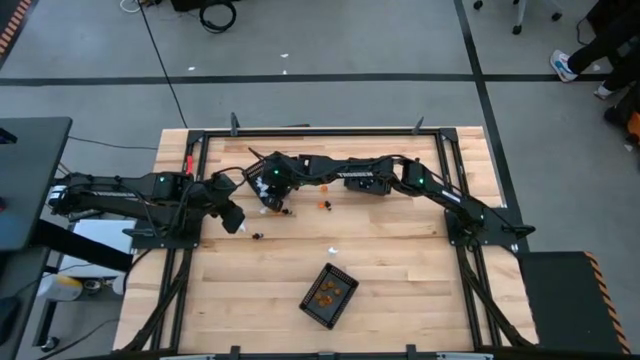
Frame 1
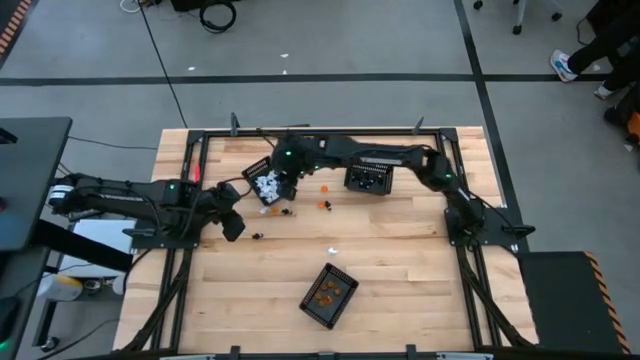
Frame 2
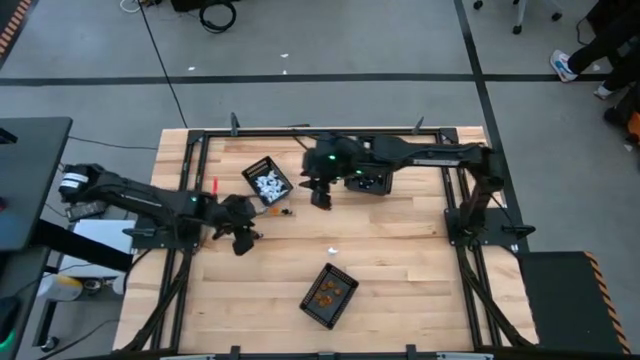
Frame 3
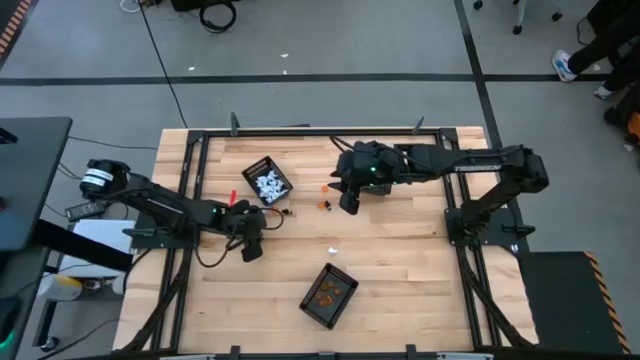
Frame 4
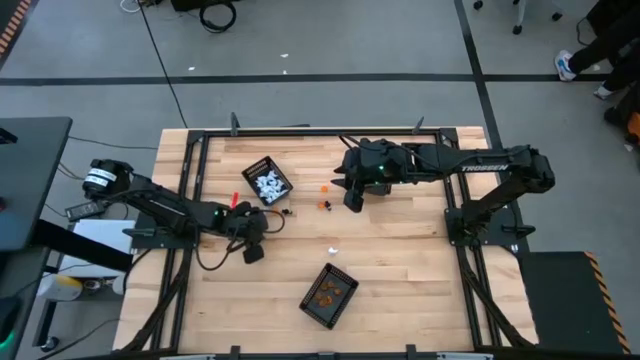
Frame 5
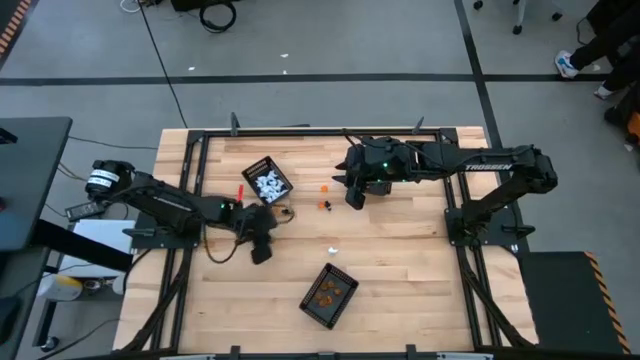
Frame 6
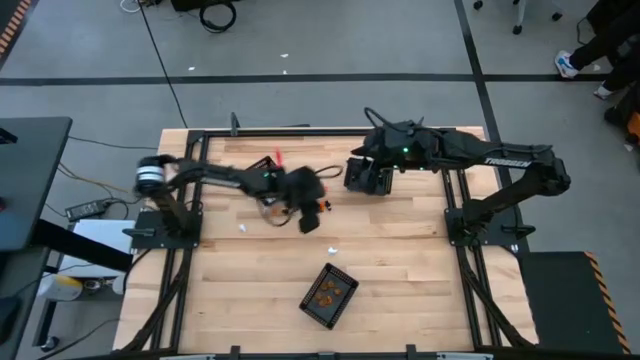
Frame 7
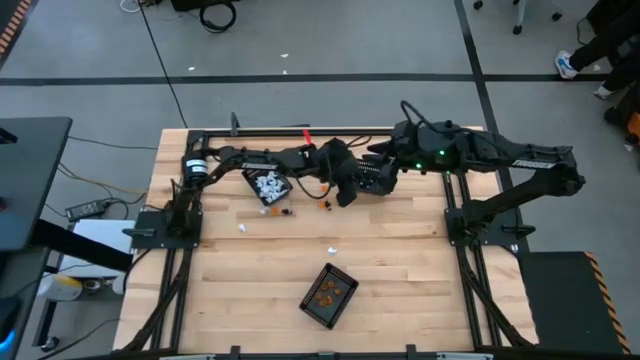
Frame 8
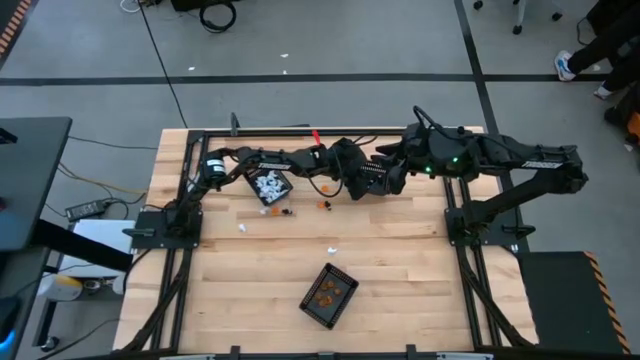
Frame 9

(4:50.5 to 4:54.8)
Task: Sort Halloween decoration
Put the black skeleton toy into the top right black basket

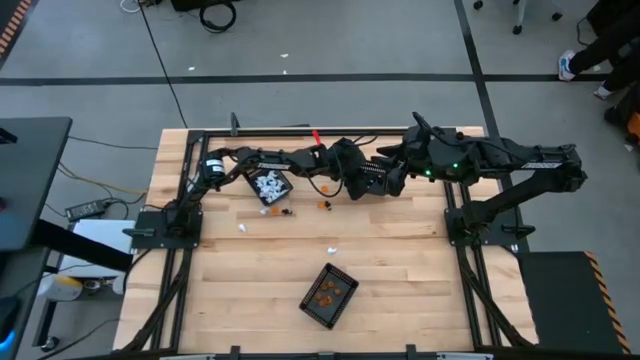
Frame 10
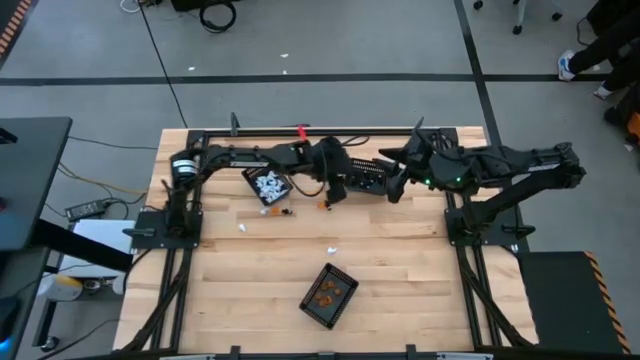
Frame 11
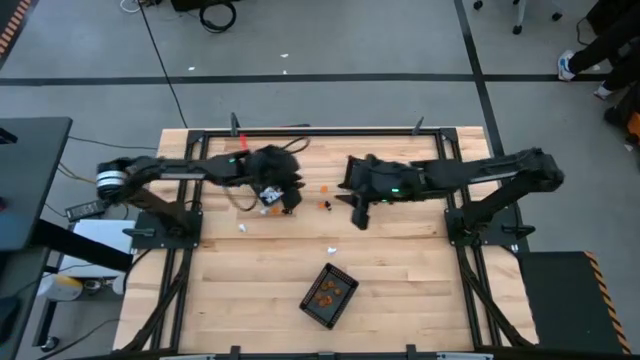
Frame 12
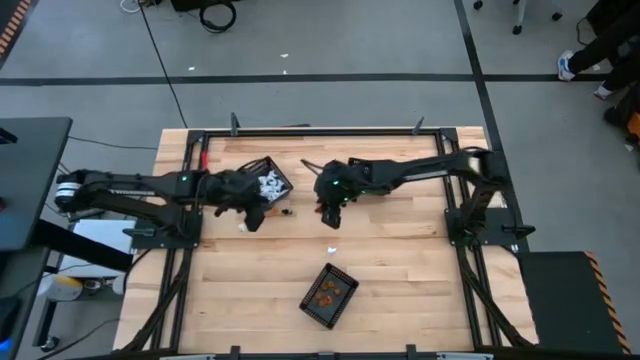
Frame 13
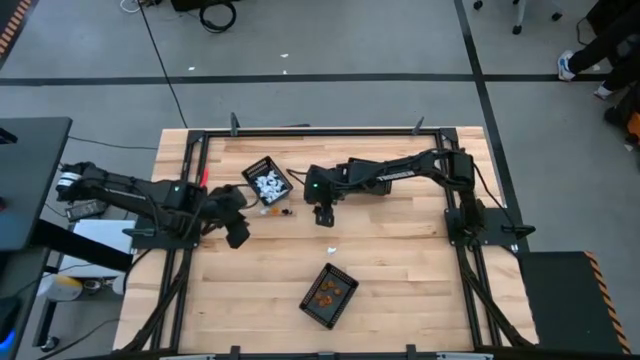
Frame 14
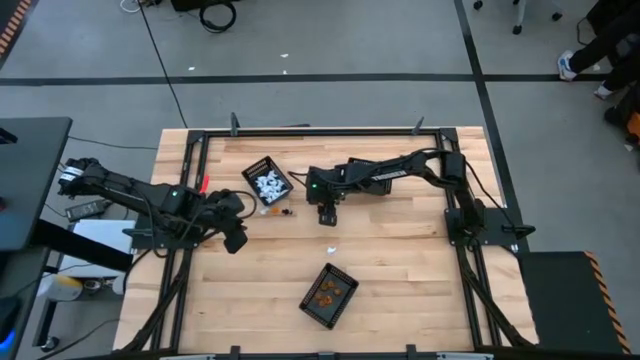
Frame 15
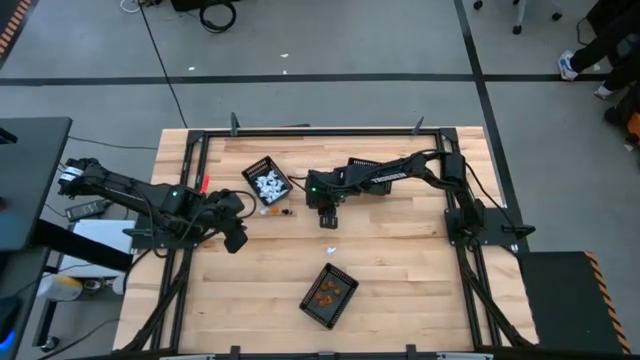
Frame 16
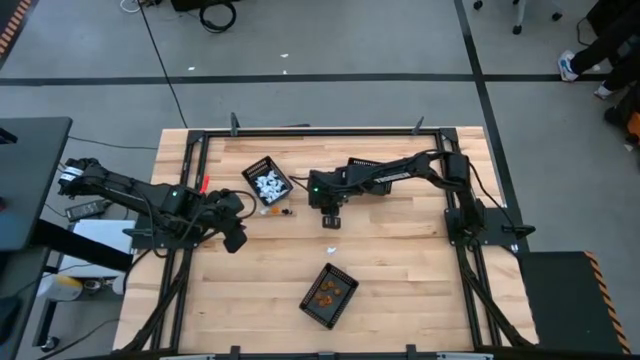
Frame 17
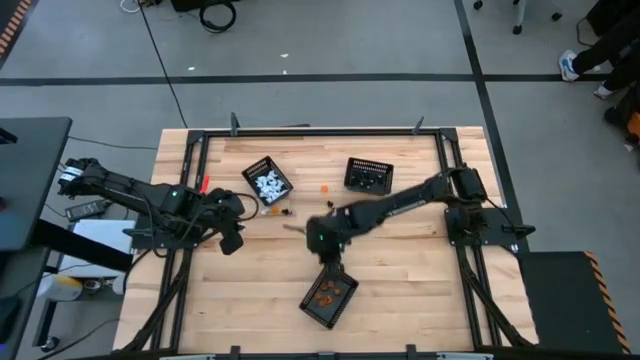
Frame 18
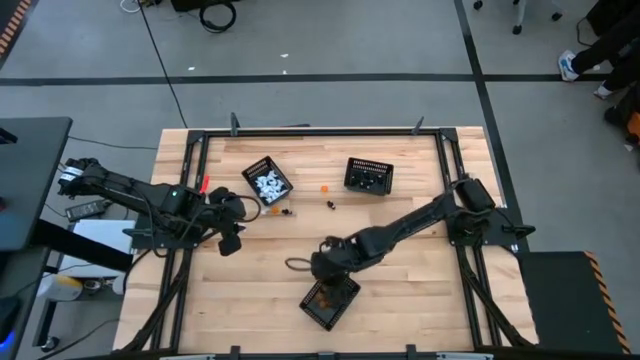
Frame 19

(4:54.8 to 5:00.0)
Put the orange pumpkin toy into the bottom black basket

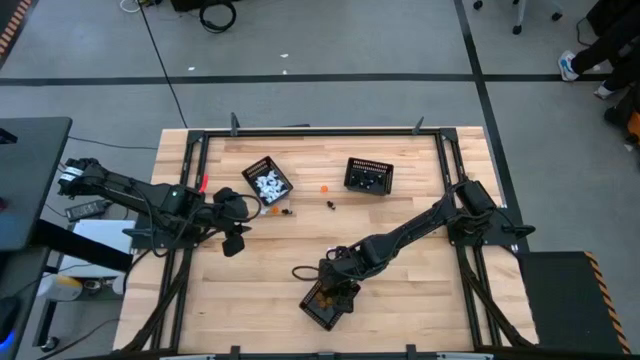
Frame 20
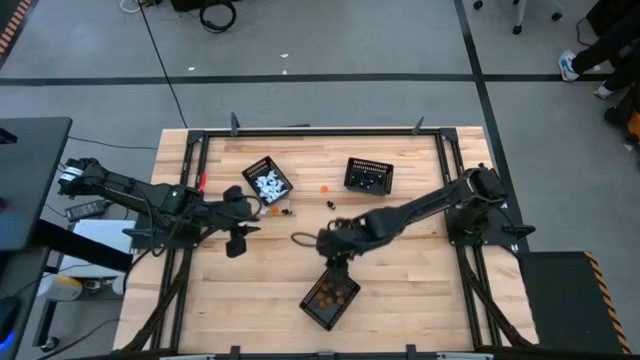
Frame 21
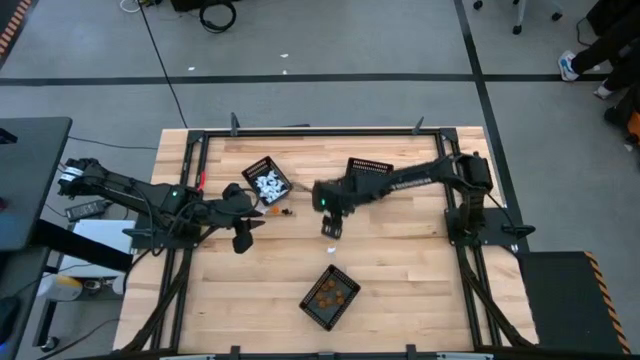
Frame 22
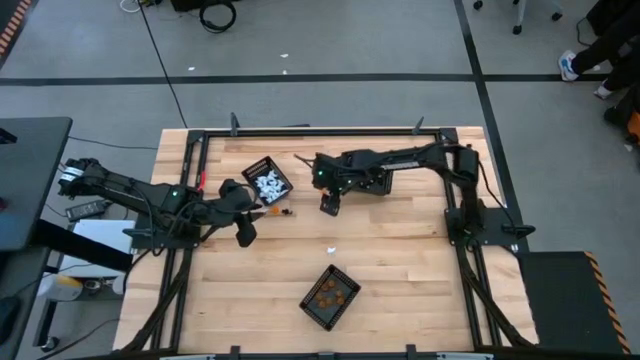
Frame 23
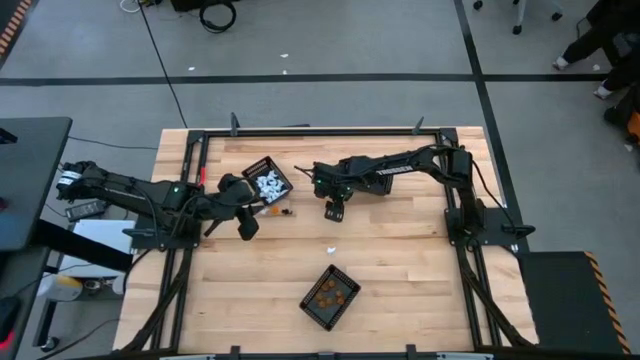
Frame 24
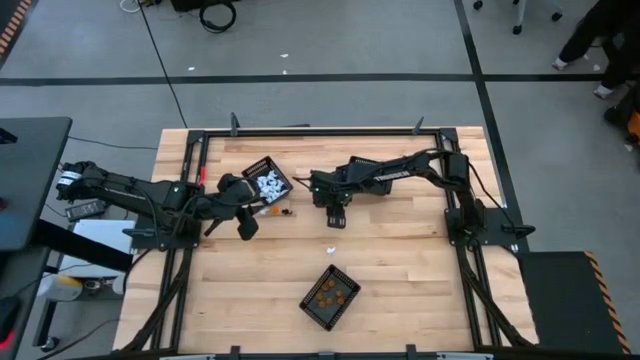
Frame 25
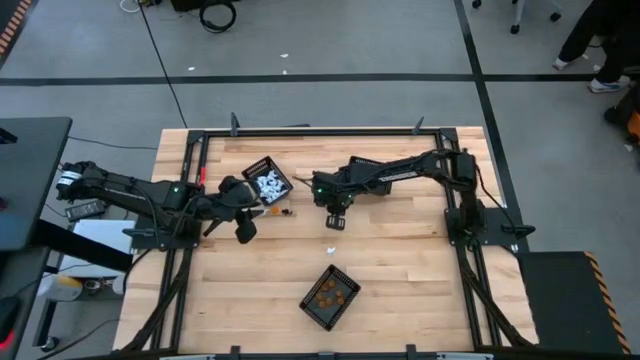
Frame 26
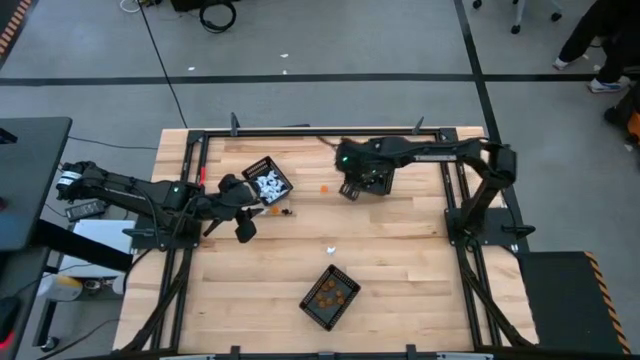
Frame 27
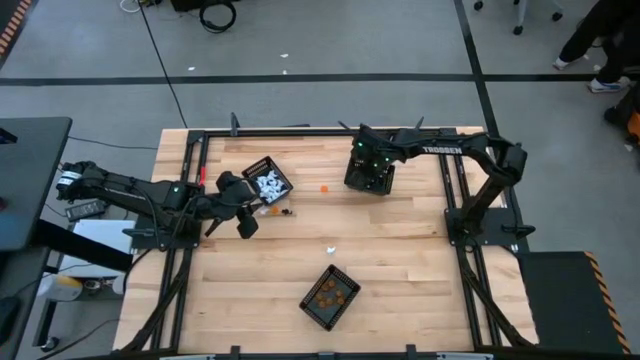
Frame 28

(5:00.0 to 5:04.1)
Put the black skeleton toy into the top right black basket

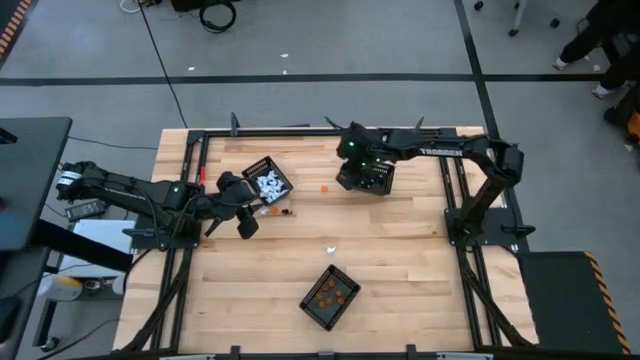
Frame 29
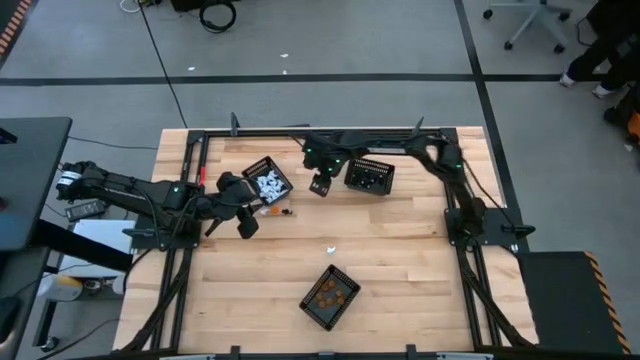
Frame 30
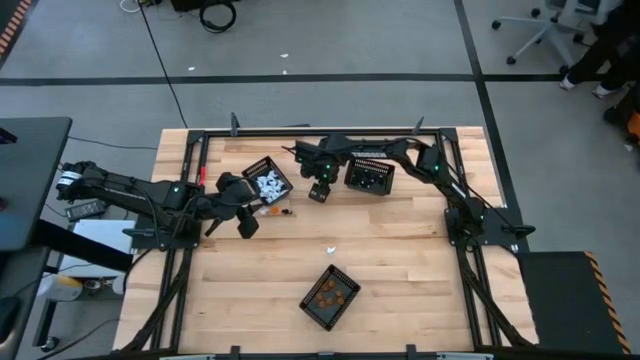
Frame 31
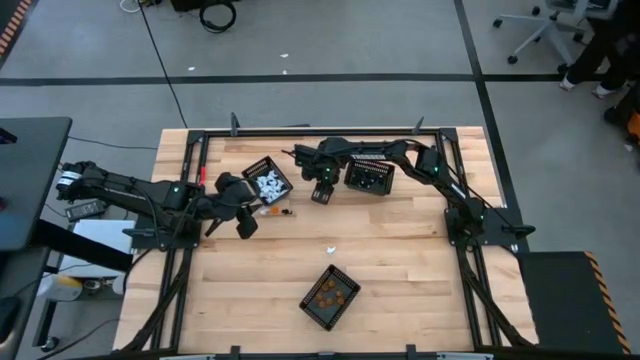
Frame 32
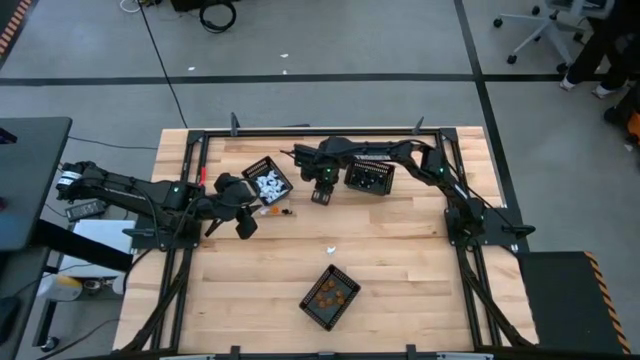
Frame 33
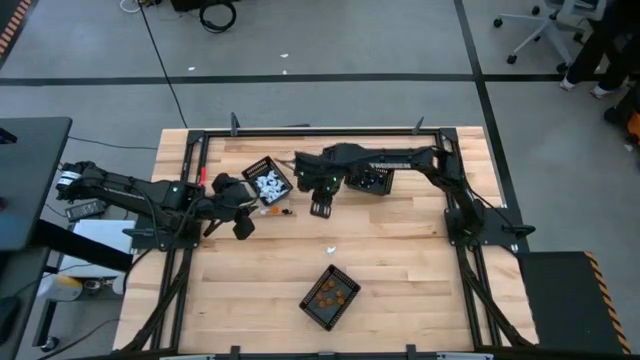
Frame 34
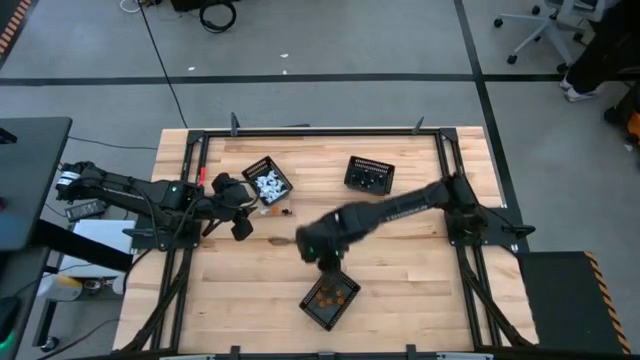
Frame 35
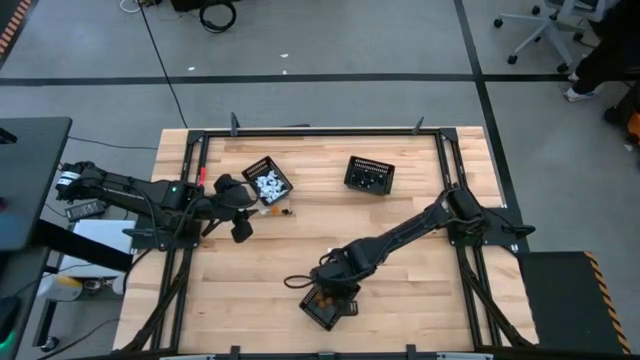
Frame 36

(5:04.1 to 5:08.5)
Put the orange pumpkin toy into the bottom black basket

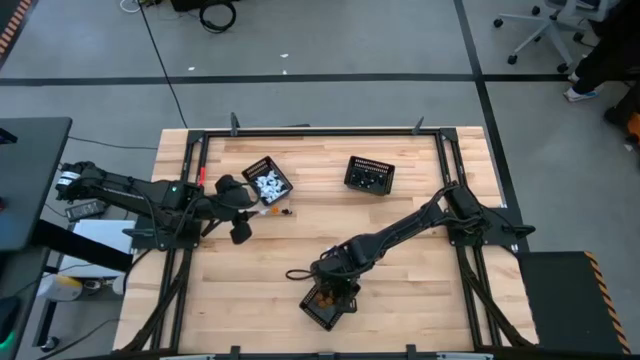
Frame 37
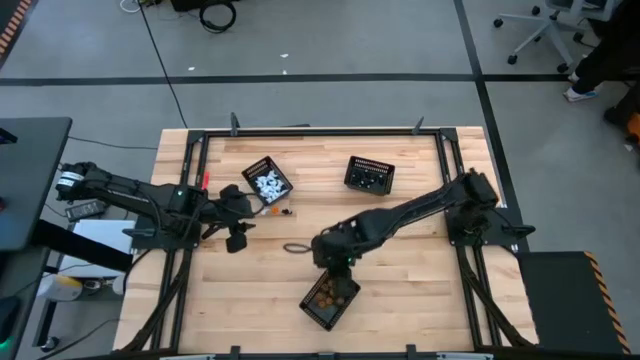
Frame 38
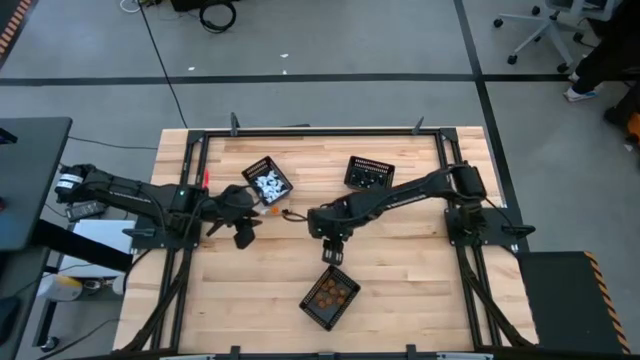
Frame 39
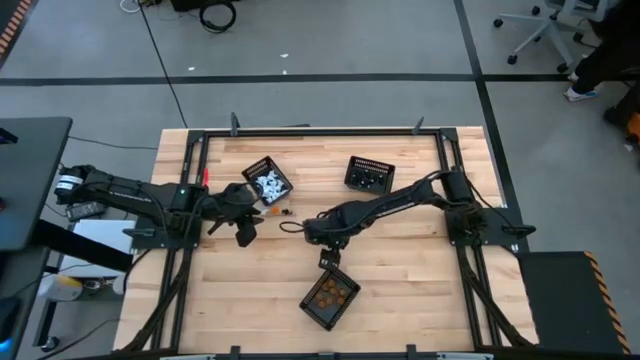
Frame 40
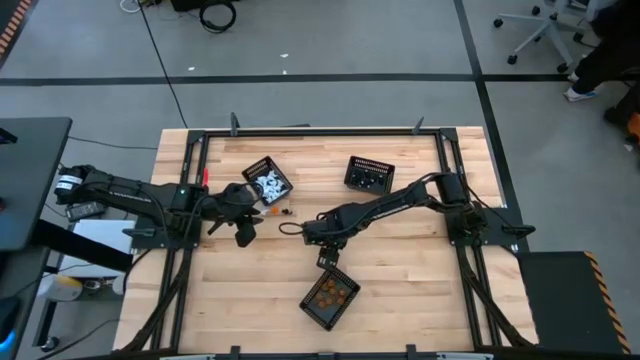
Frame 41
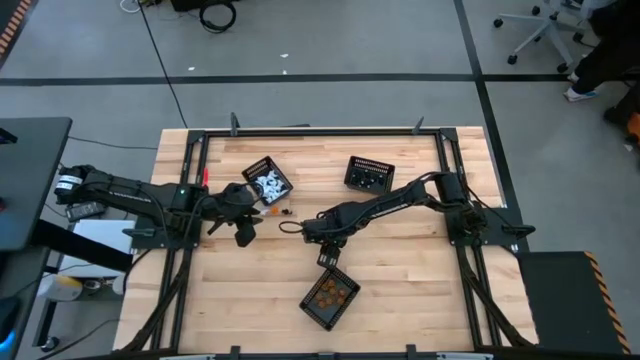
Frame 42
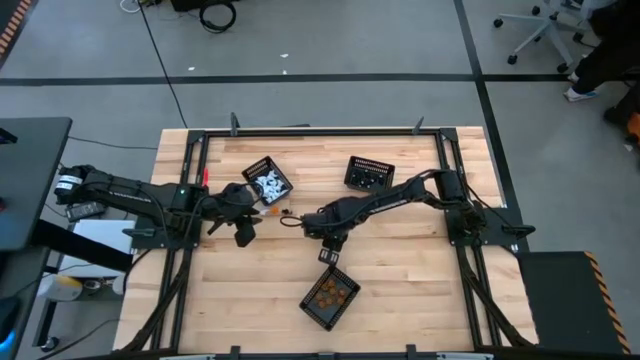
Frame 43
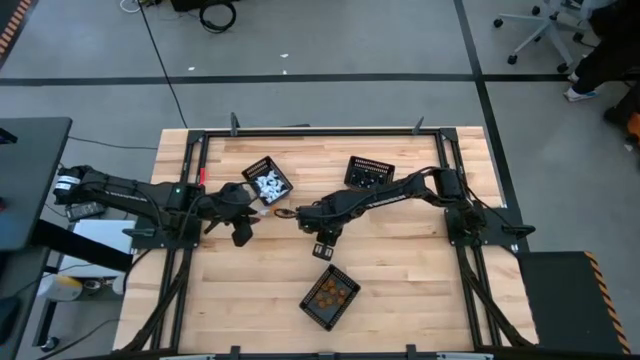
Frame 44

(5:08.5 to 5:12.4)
Put the white ghost toy into the top left black basket
